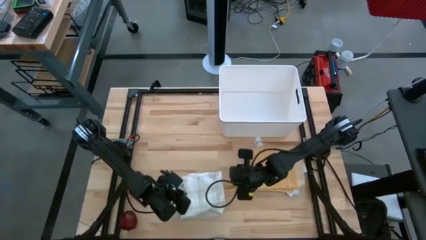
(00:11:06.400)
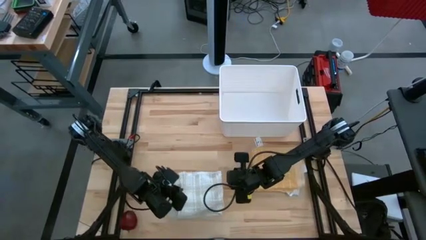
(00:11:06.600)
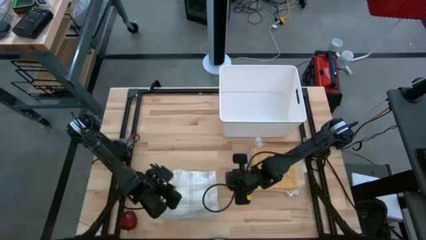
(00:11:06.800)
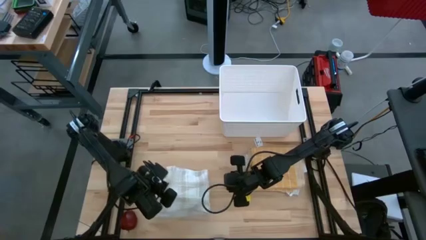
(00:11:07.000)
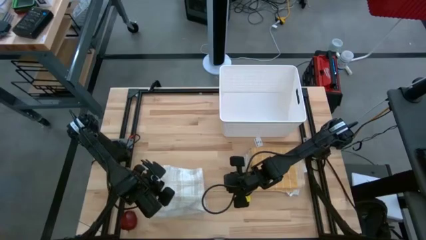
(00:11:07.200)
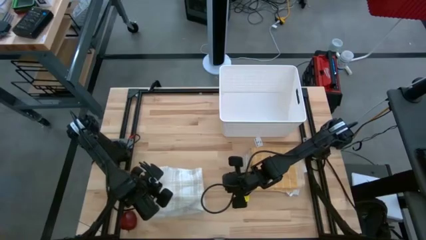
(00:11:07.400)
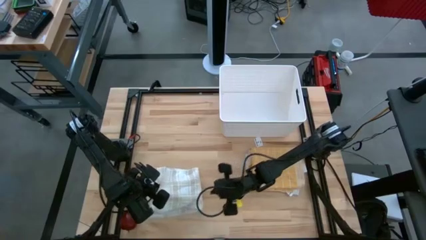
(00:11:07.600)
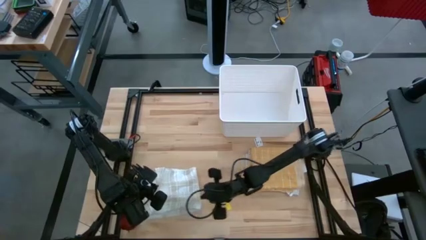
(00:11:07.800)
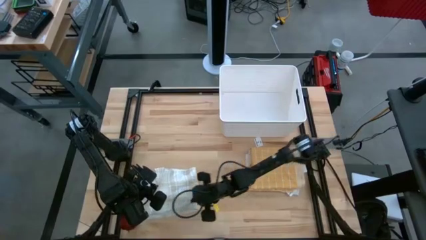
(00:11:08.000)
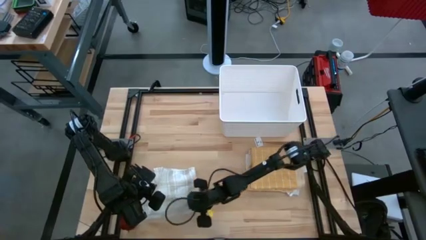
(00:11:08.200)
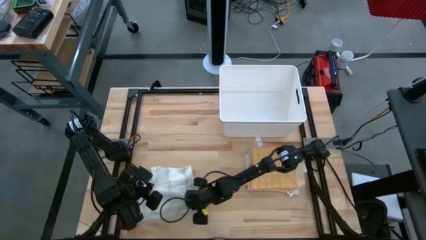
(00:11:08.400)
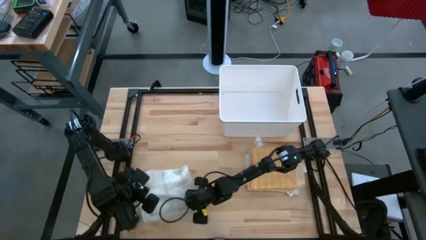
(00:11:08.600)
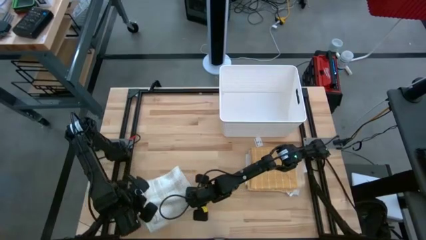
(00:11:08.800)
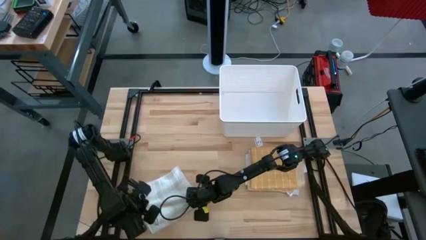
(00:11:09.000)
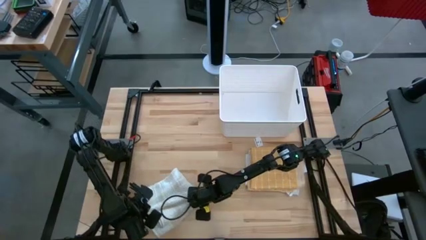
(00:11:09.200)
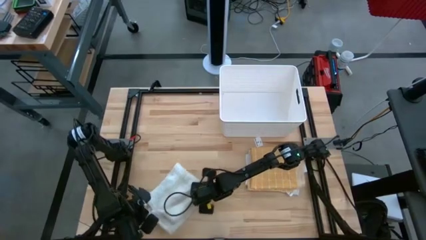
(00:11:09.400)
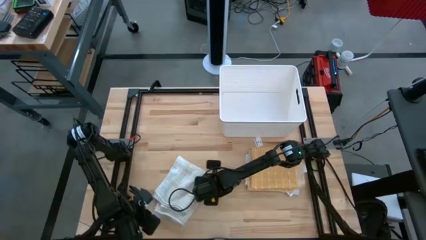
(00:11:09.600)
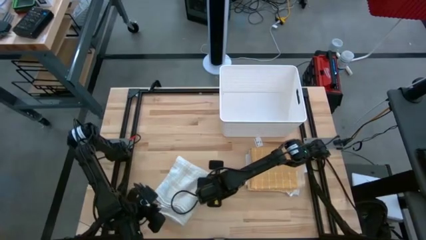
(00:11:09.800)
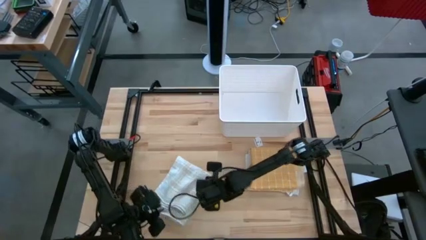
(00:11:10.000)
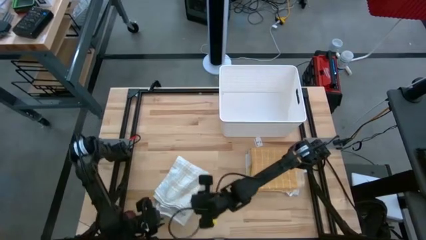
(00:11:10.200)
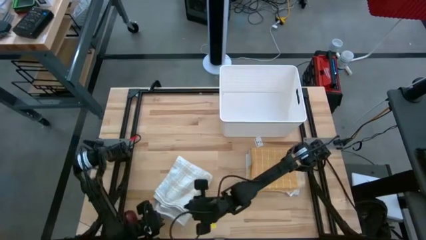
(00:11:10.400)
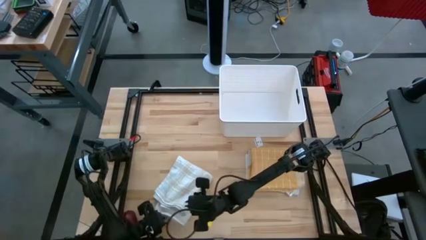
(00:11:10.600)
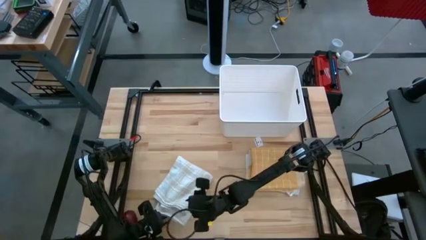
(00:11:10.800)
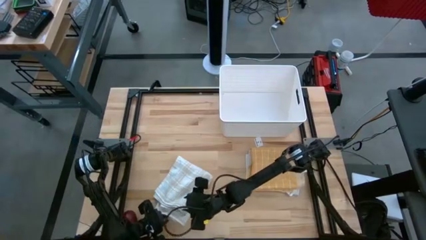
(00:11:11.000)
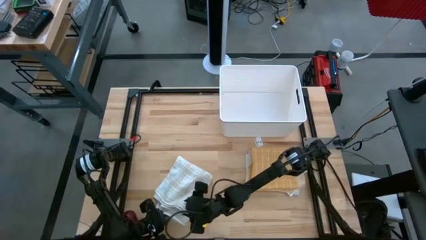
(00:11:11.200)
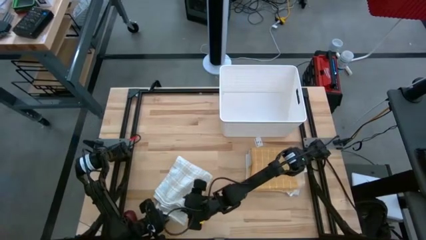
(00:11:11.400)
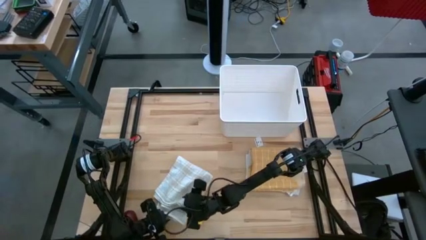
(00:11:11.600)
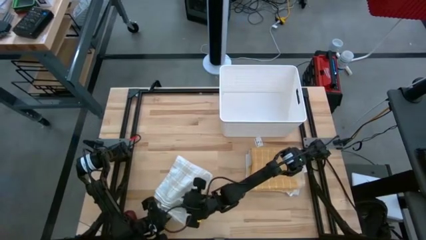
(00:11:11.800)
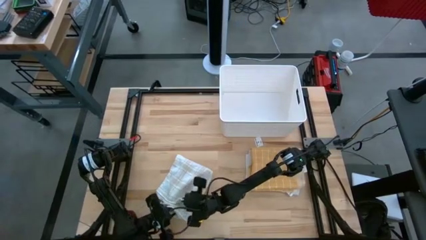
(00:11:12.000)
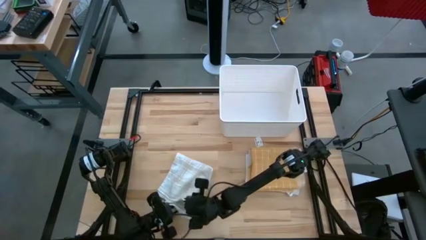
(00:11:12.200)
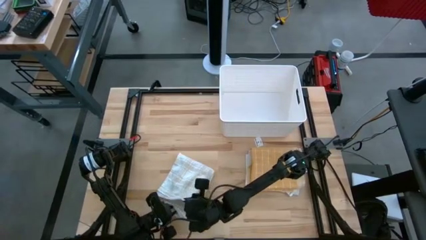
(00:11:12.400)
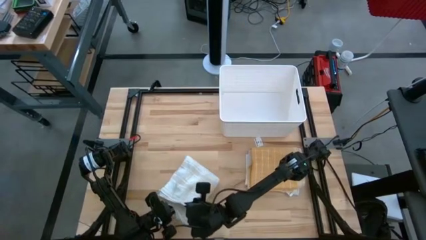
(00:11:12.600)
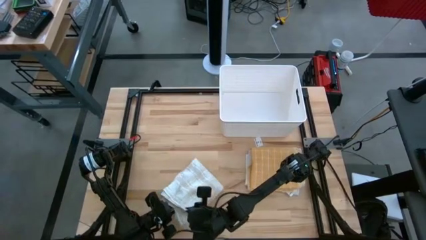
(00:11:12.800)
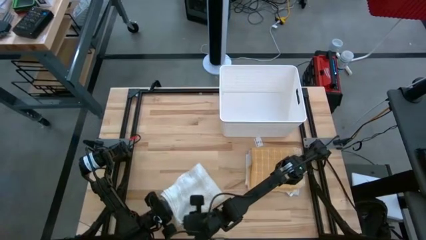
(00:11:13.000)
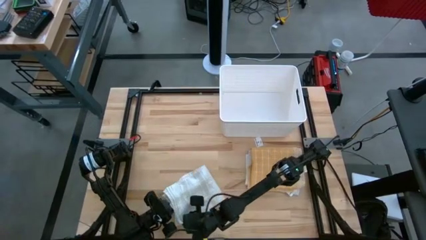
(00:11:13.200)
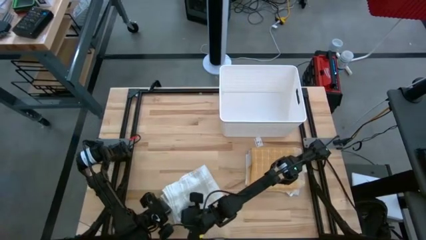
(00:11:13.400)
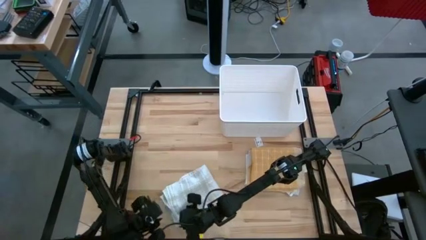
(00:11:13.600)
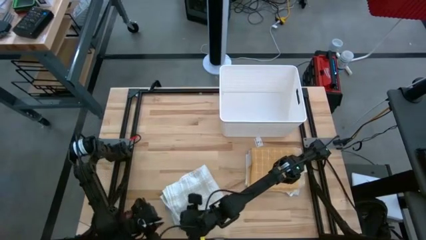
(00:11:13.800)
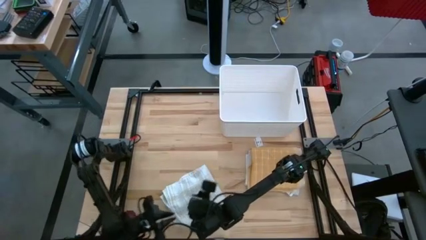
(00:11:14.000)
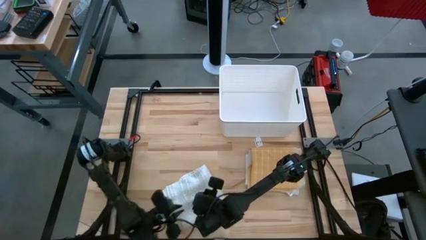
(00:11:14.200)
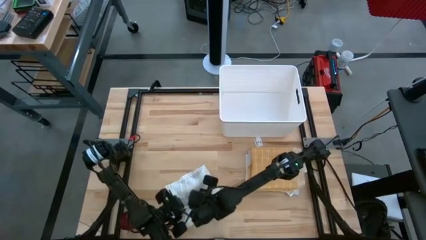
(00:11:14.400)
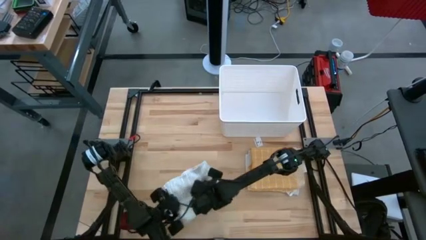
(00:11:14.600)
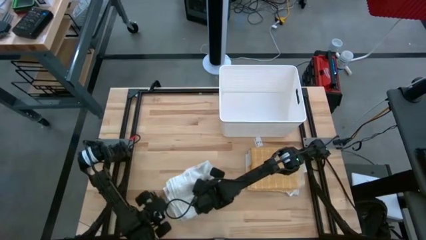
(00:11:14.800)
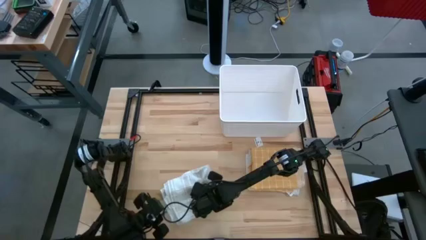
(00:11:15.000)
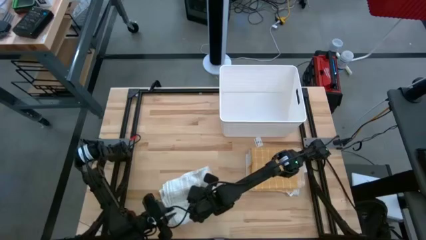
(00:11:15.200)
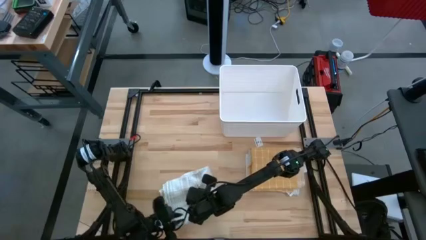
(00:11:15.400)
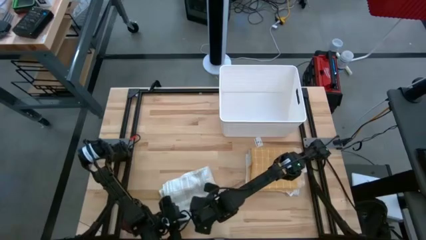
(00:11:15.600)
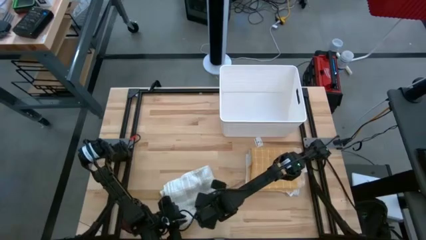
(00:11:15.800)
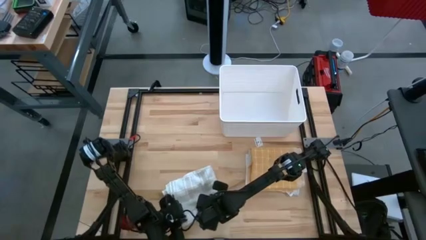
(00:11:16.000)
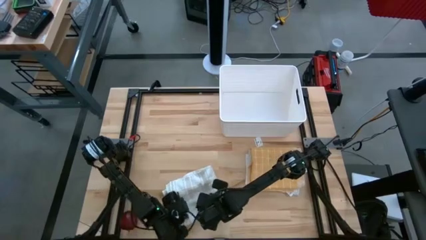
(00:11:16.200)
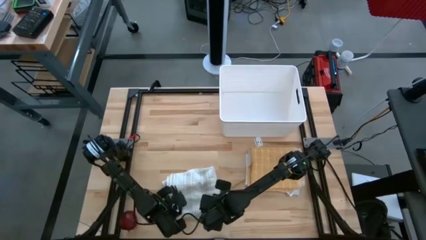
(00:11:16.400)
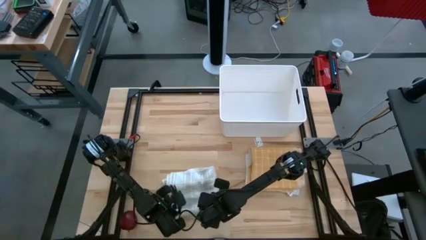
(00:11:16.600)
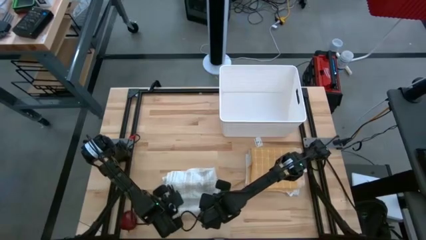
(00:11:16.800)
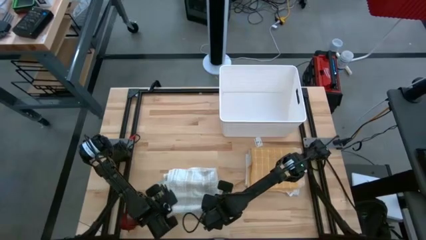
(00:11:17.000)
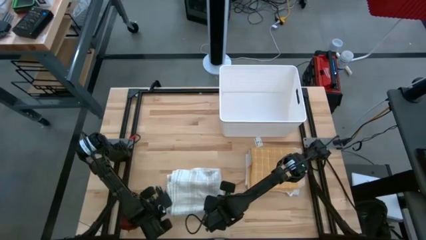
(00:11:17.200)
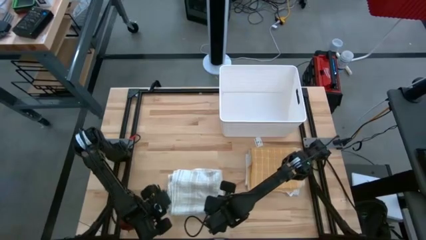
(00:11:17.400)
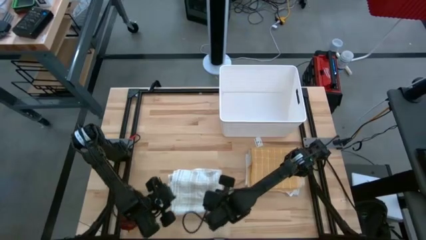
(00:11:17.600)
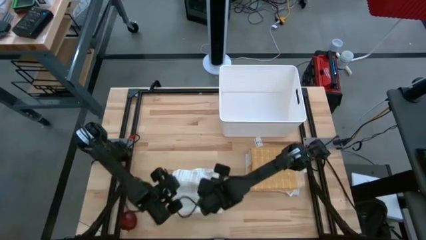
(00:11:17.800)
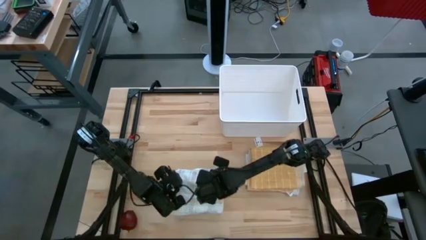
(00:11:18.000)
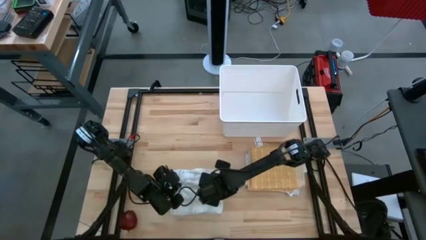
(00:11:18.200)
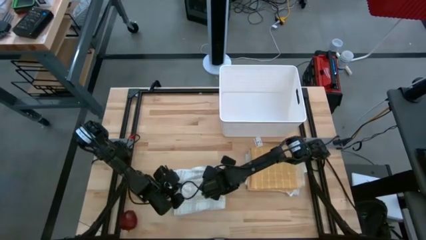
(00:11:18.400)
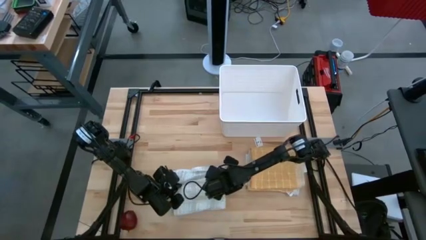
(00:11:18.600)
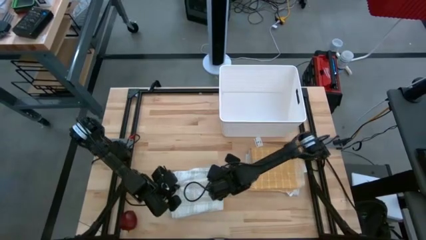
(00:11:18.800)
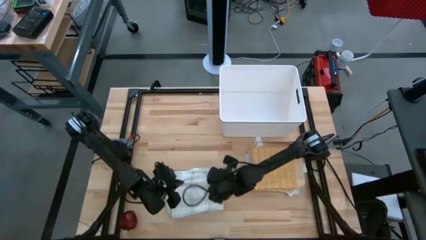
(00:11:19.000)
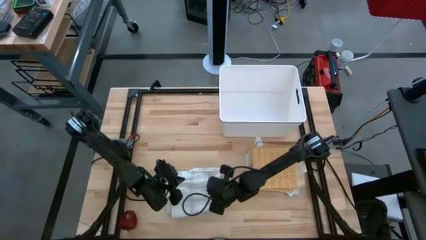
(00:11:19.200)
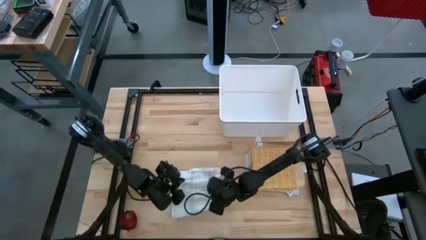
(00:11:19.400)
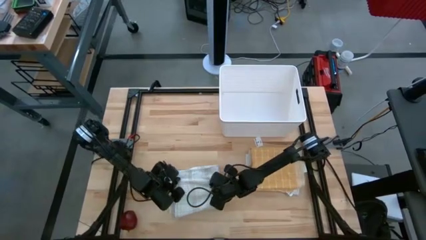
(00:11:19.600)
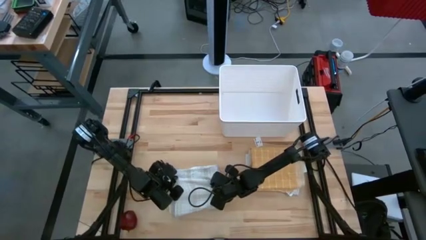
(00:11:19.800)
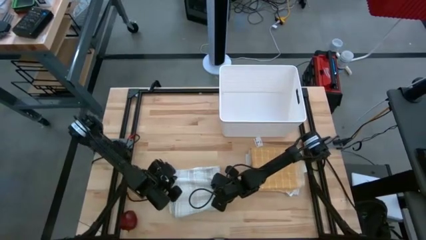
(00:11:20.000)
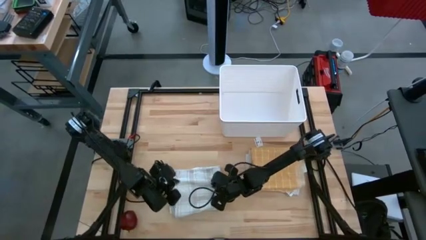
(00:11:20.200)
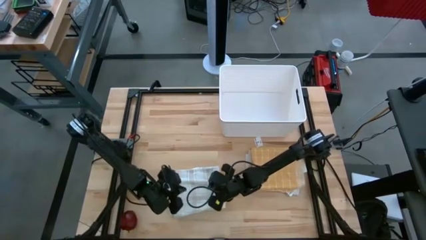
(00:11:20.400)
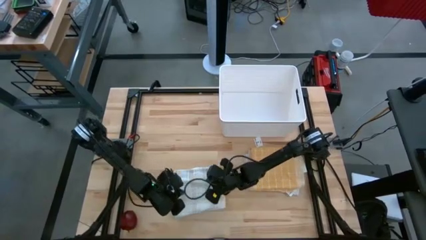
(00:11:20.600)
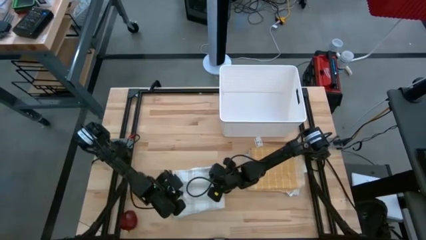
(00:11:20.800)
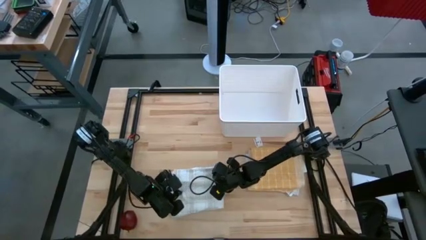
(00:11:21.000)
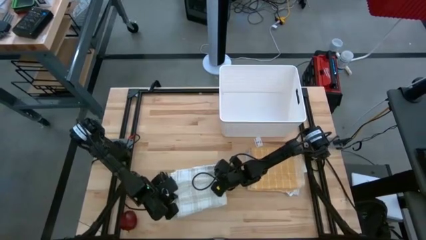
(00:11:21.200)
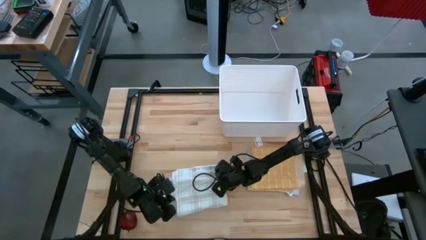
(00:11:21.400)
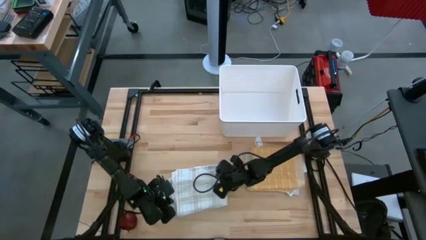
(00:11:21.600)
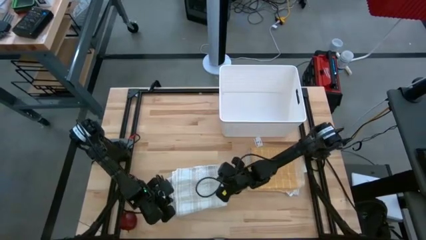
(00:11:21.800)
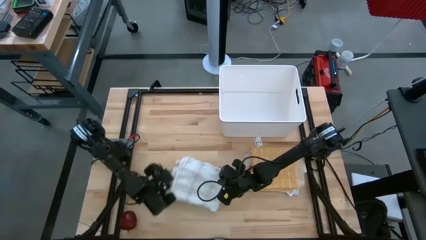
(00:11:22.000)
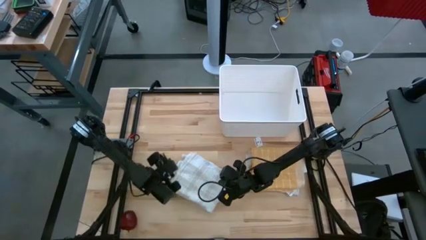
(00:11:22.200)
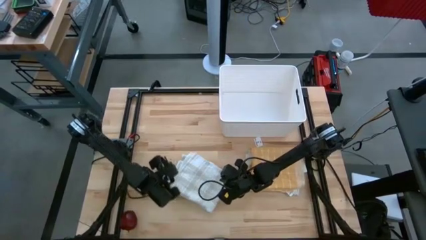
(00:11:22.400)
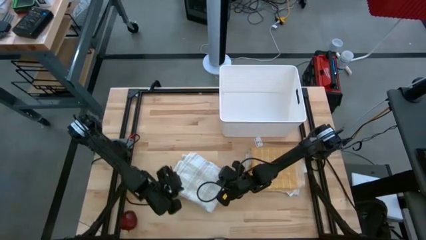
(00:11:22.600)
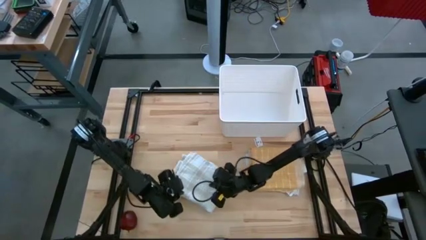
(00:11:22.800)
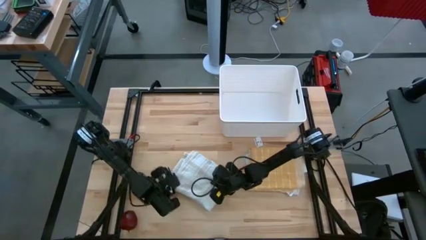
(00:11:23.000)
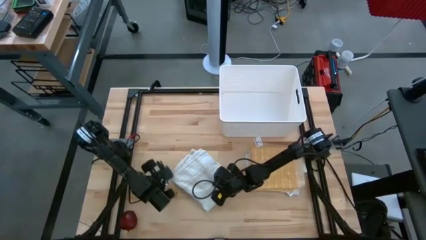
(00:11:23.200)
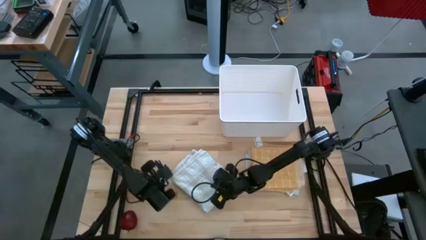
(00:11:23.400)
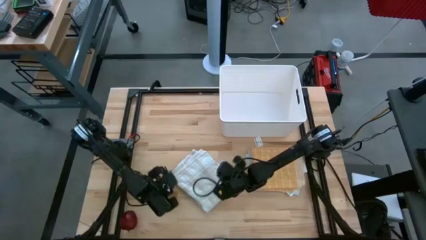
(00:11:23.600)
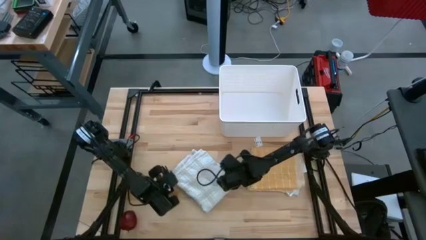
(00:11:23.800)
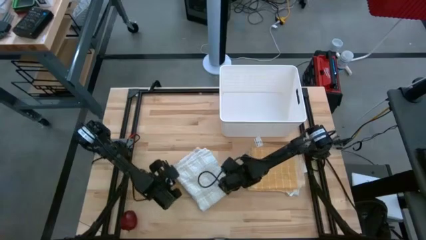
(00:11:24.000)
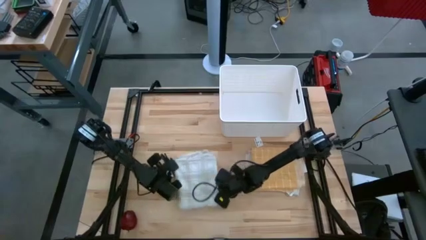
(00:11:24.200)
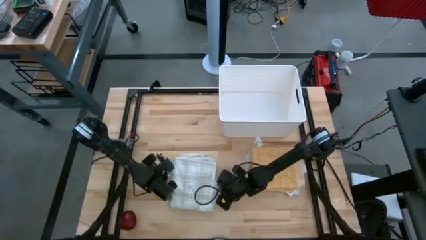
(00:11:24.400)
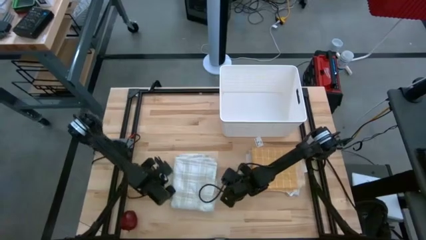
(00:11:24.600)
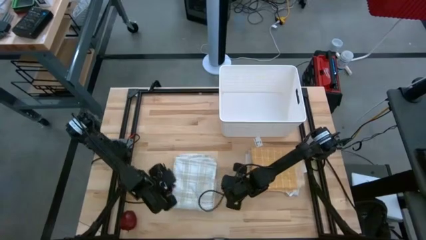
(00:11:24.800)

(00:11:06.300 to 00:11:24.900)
Task: Fold towel
Fold the white checkered towel
